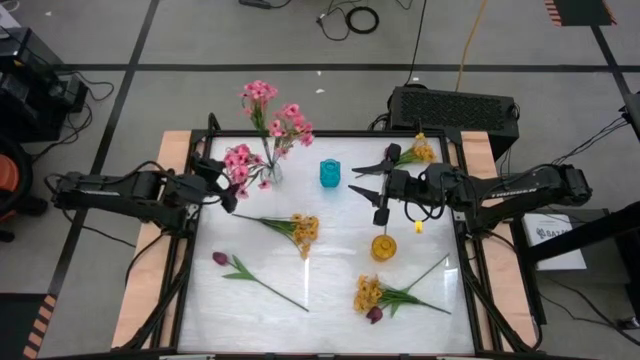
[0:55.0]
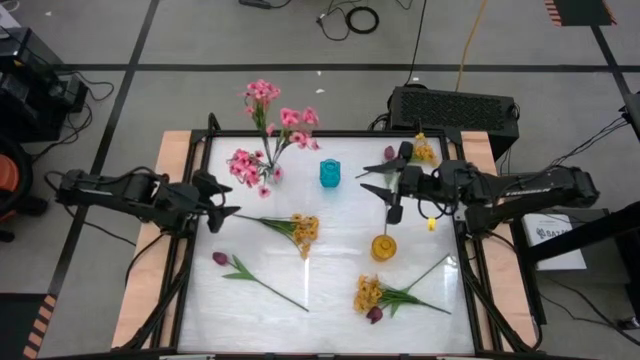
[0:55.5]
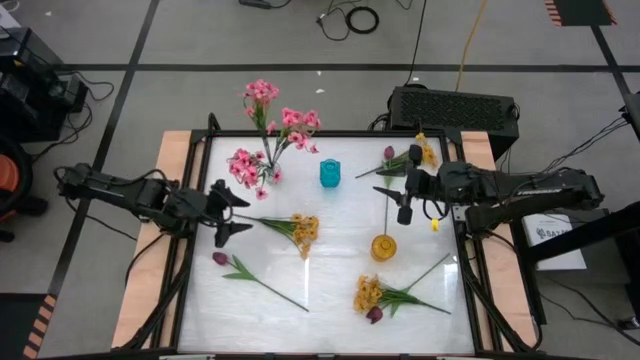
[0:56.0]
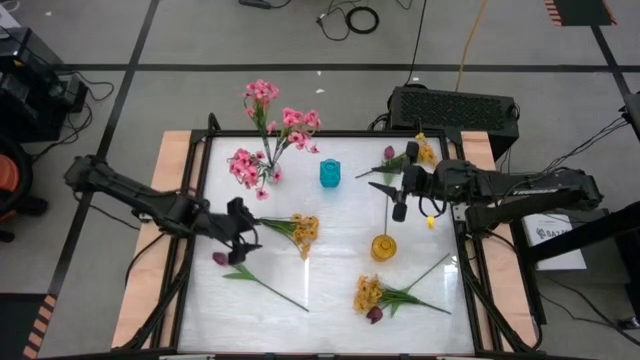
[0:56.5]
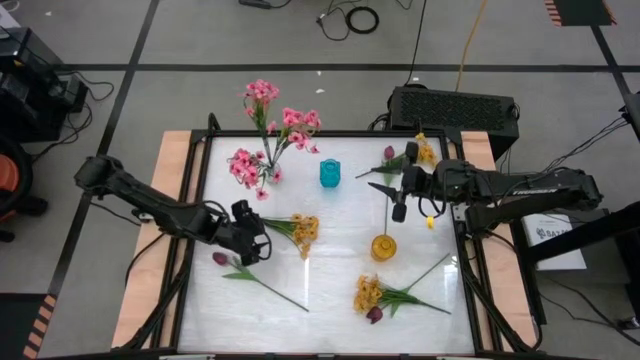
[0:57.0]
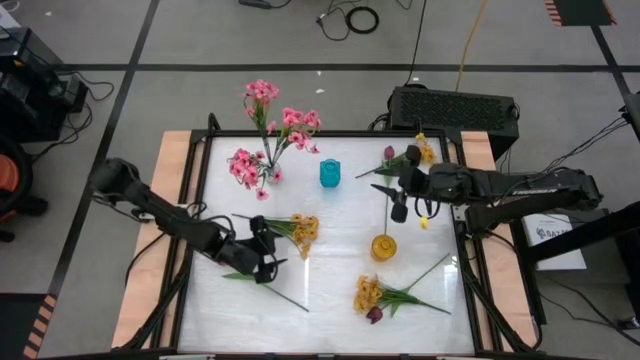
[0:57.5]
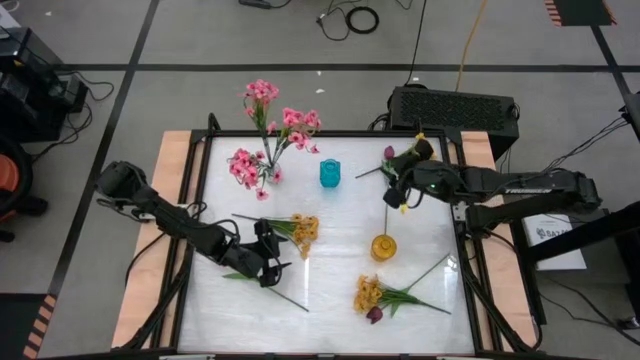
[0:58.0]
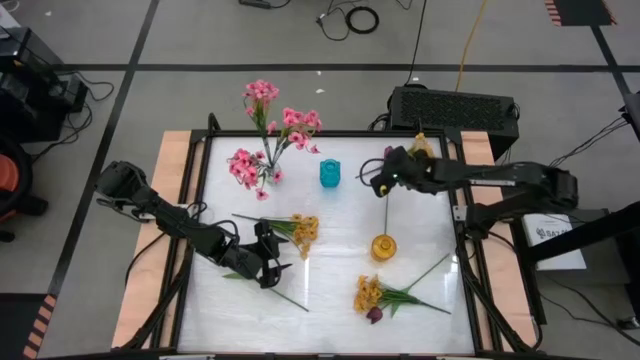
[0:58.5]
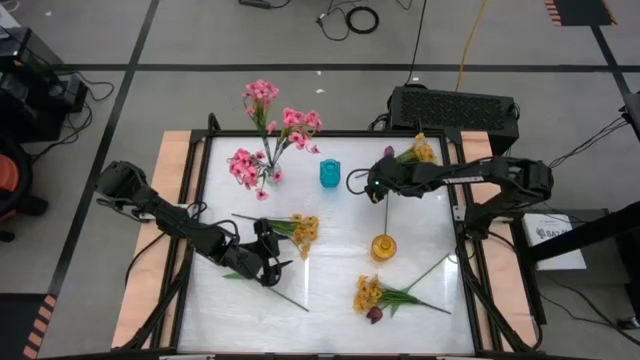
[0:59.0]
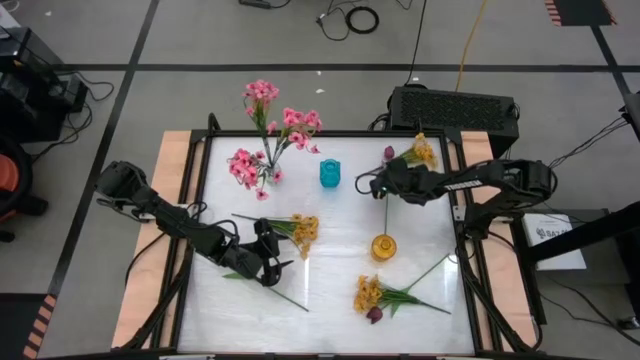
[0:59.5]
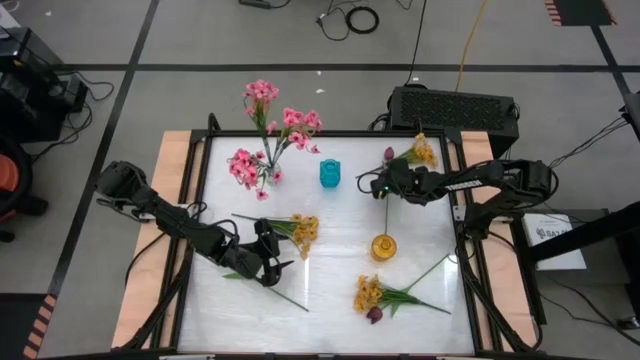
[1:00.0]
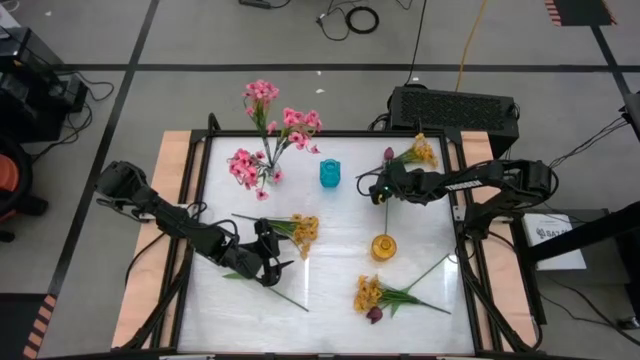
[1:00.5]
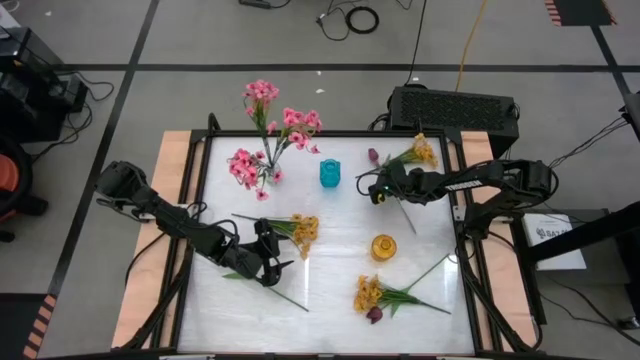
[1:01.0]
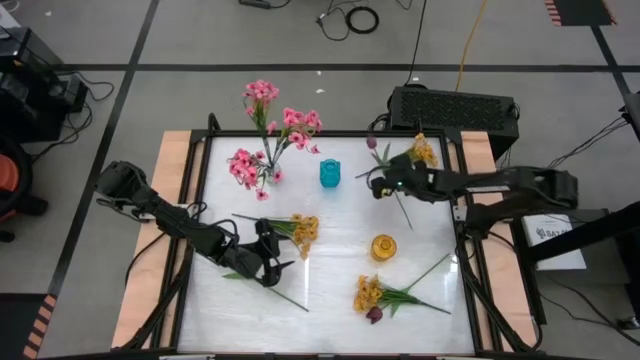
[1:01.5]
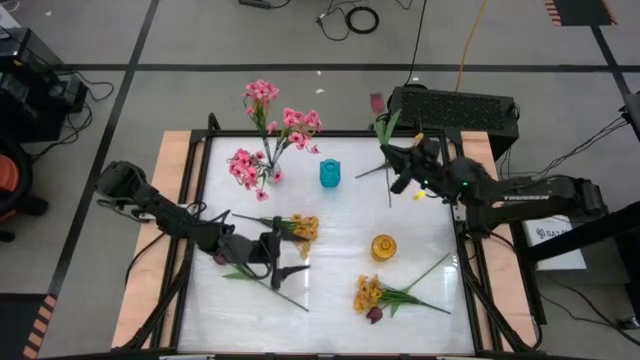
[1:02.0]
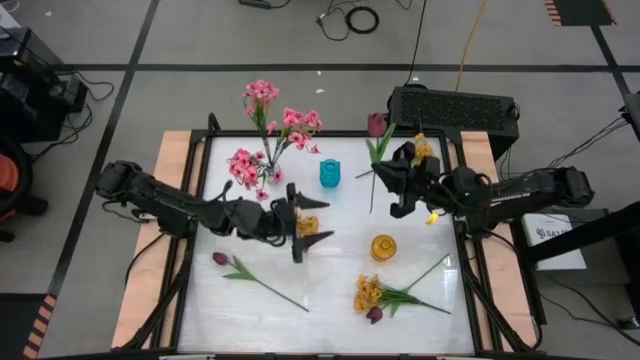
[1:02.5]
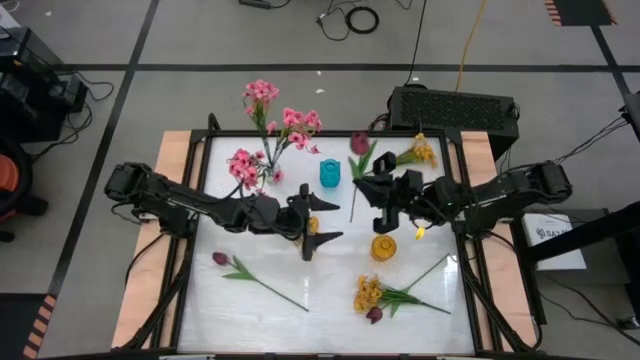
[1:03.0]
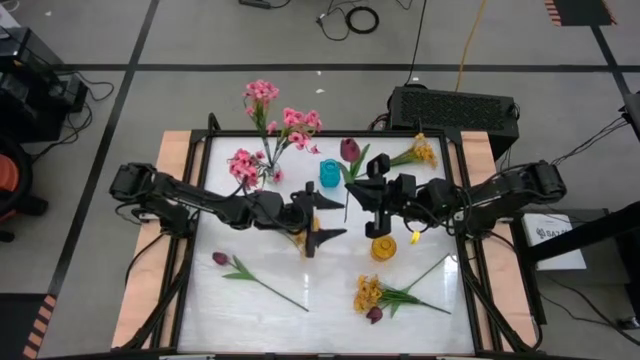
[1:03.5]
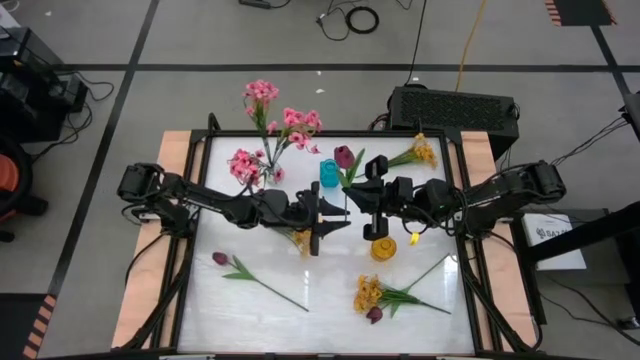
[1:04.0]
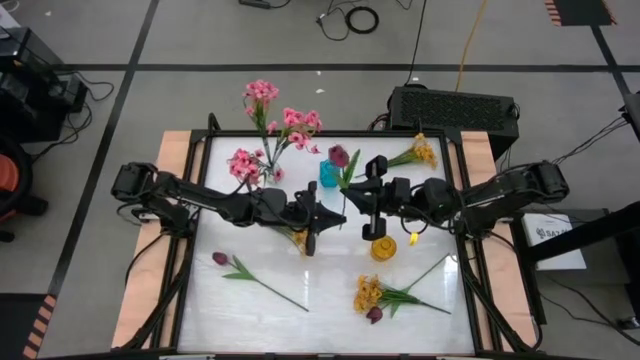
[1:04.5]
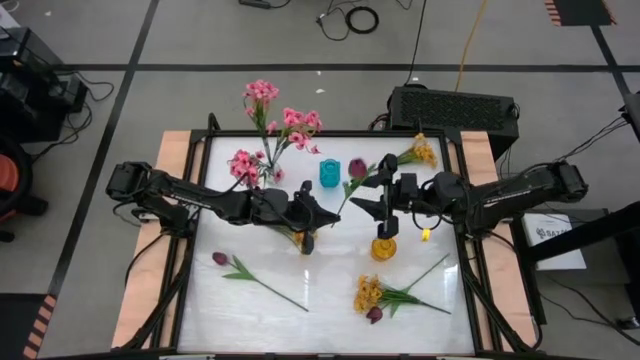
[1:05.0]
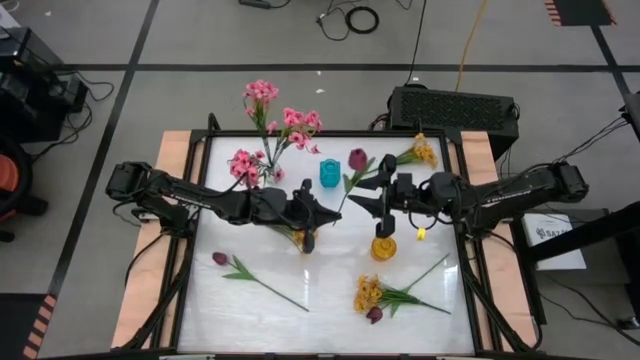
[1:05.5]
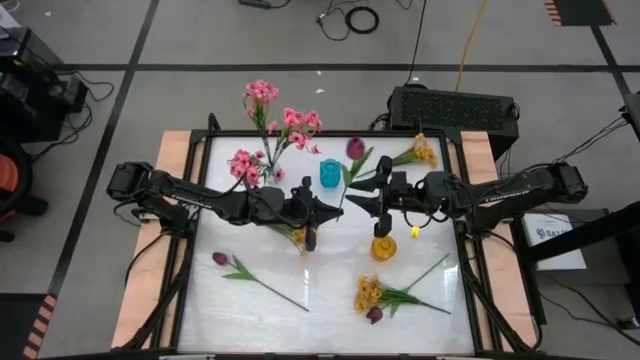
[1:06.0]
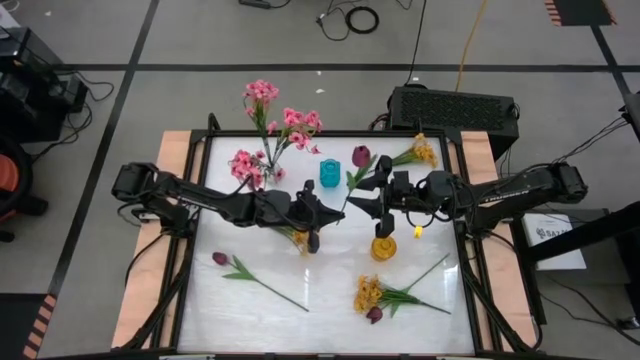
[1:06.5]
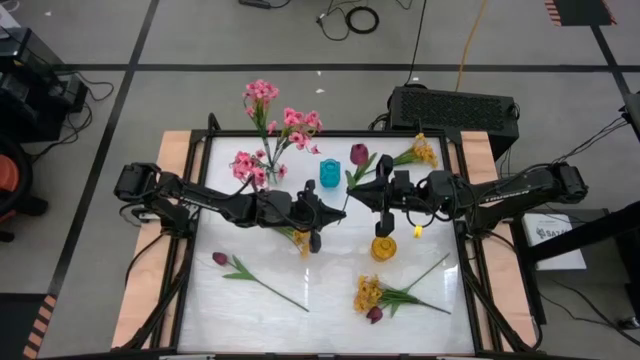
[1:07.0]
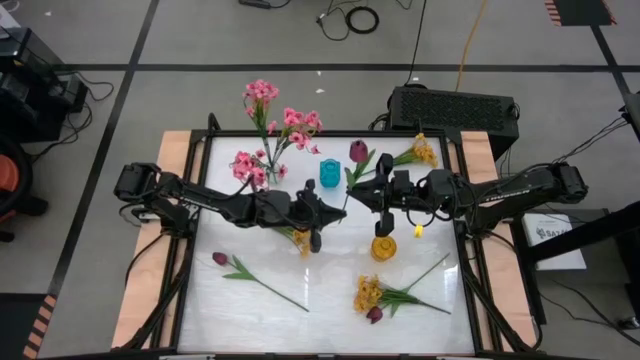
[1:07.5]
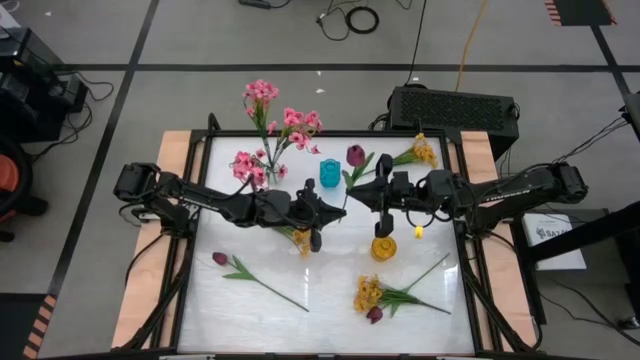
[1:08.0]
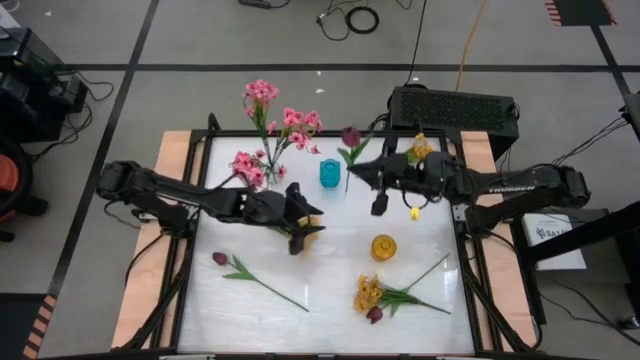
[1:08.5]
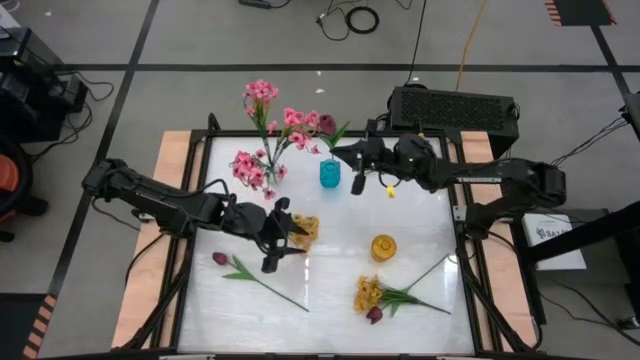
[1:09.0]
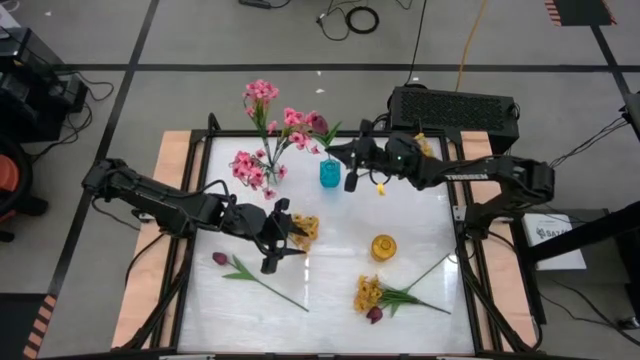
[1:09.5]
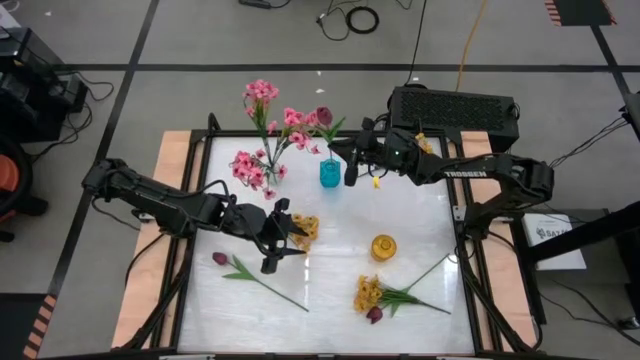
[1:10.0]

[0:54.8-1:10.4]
Task: Sort flowers into vase by color
Put the top red flower into the blue vase

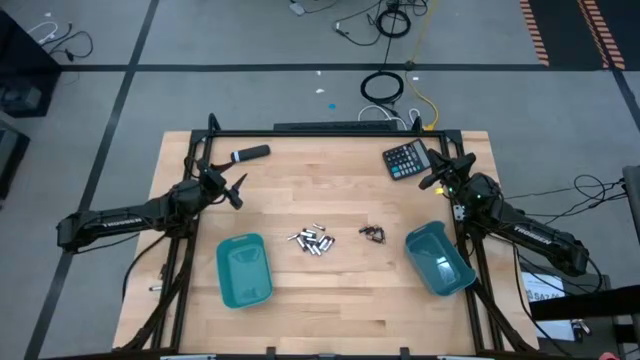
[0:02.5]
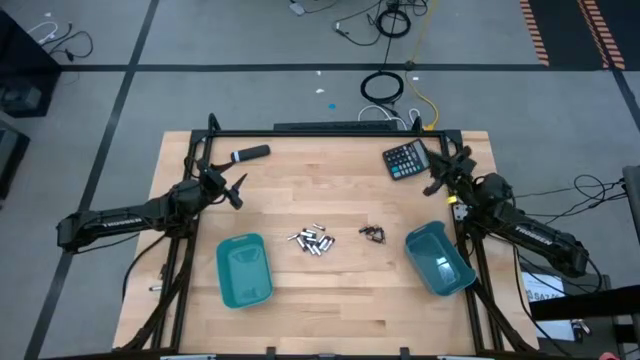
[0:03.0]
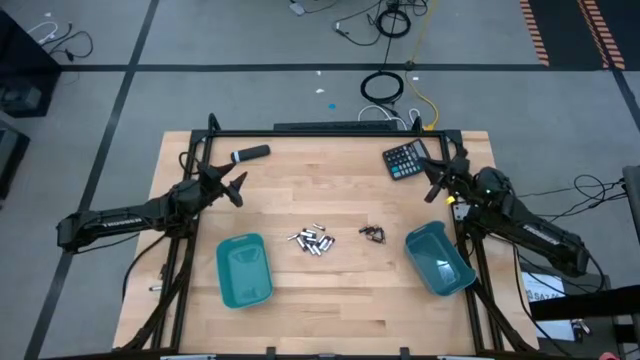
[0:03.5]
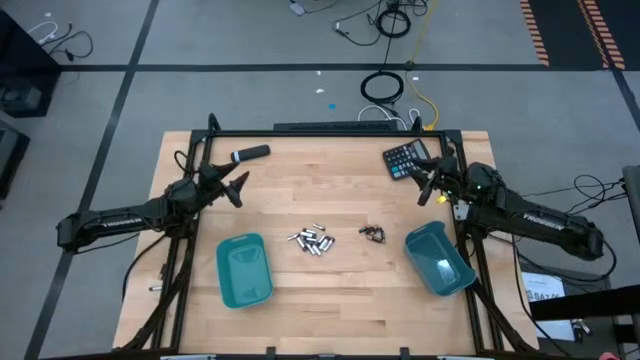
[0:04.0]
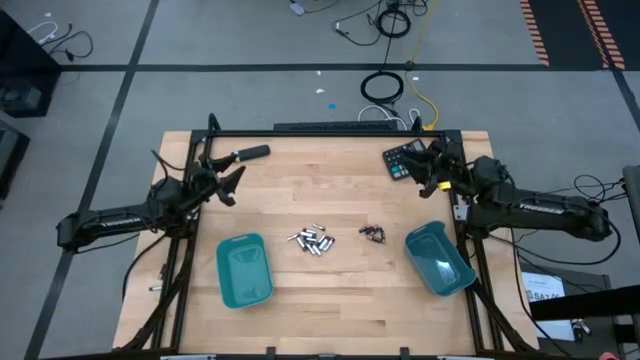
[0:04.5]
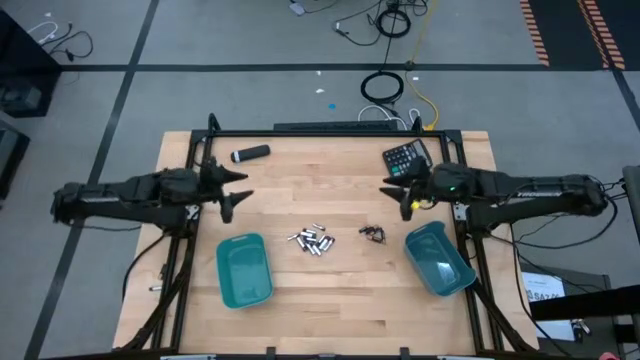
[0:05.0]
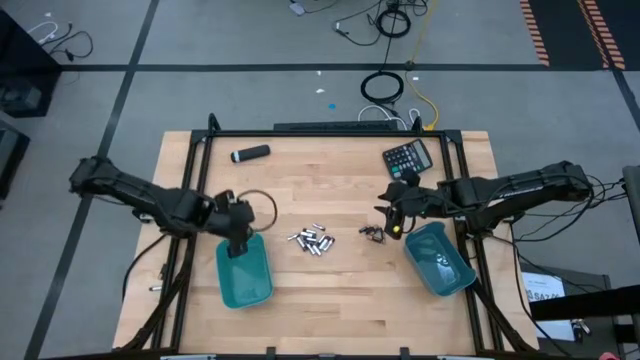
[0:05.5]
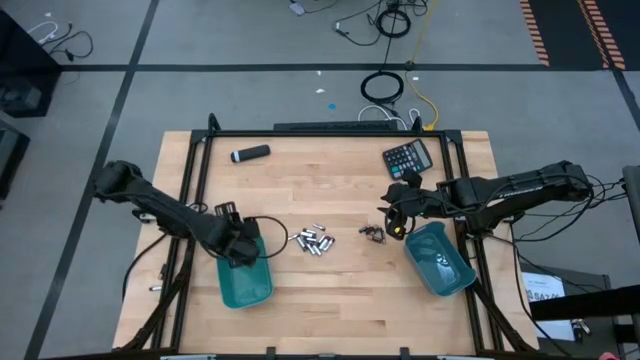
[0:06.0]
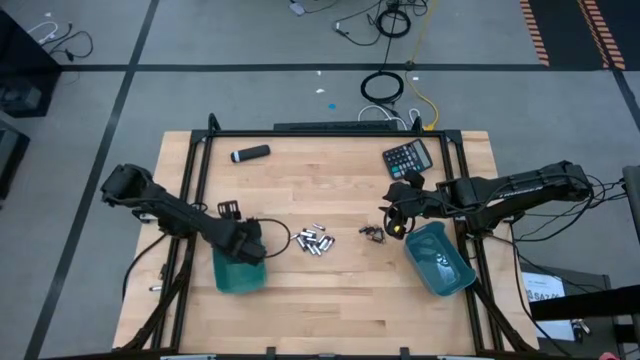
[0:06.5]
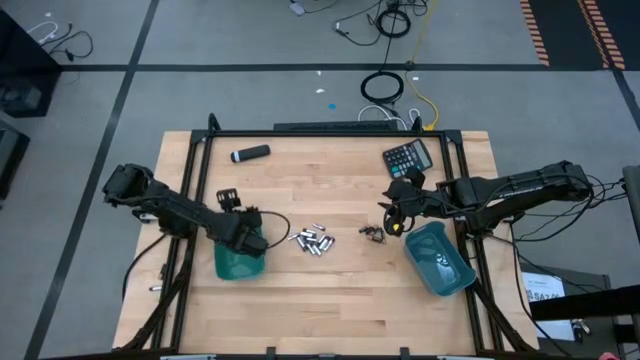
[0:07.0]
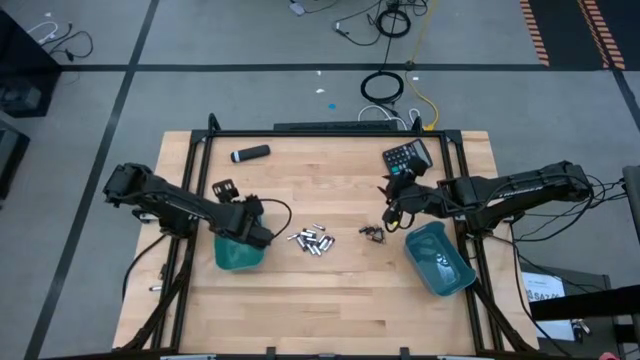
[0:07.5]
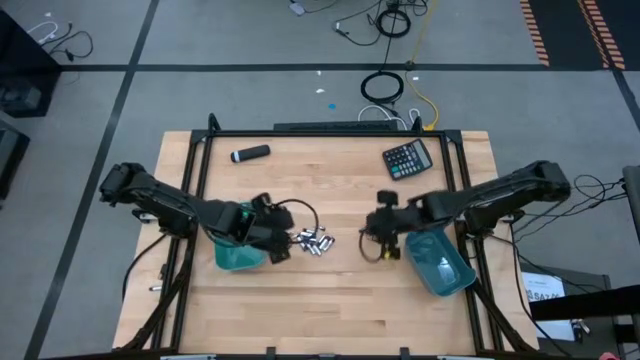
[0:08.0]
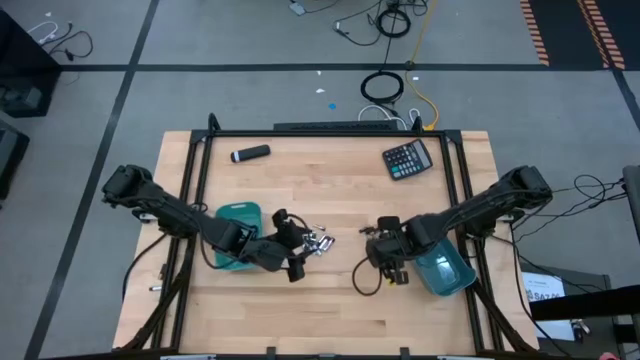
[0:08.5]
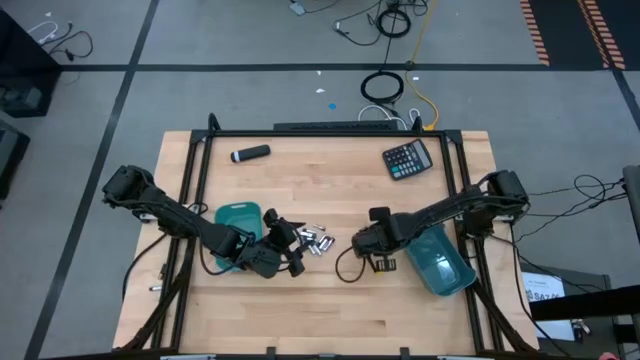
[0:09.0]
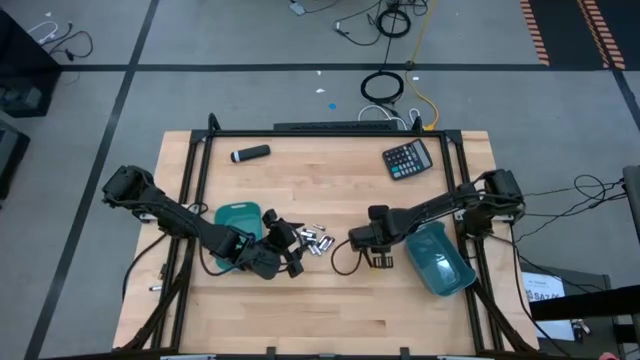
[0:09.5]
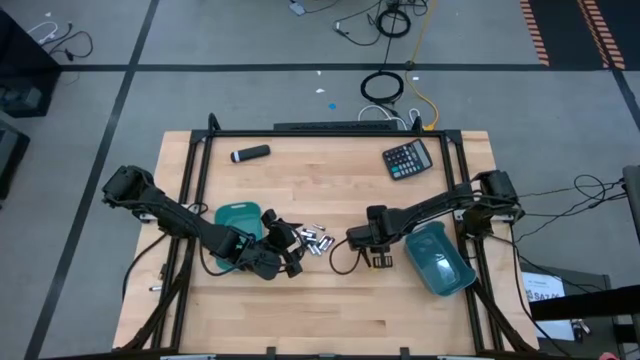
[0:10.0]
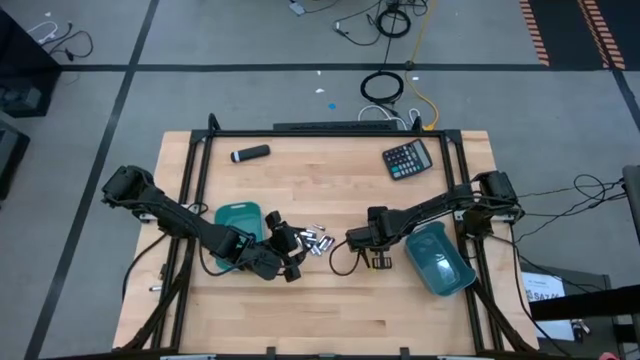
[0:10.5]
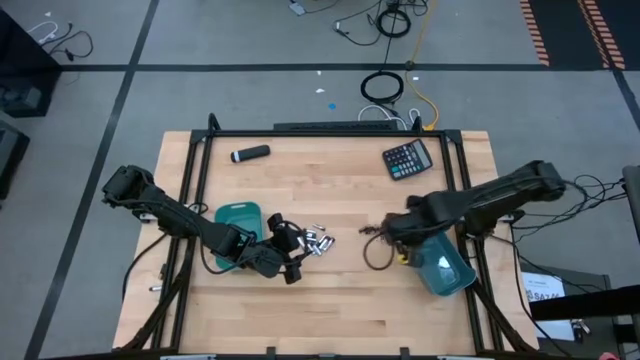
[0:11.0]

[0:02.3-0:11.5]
Task: Sort batteries
Prepare the light blue bin
